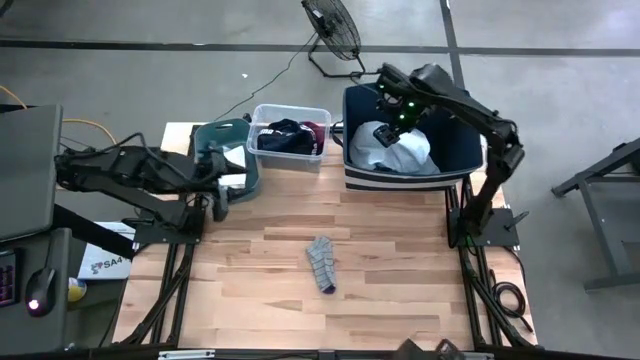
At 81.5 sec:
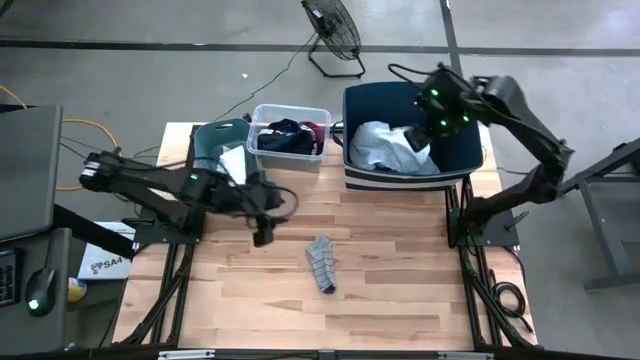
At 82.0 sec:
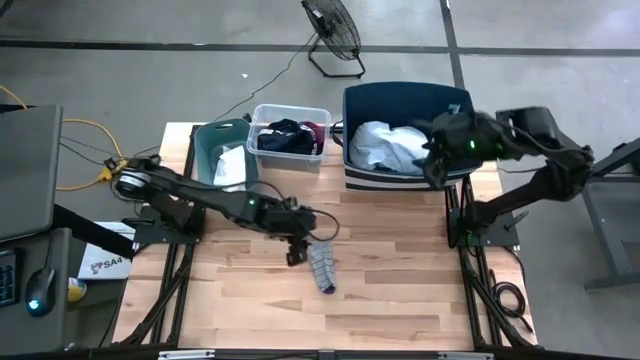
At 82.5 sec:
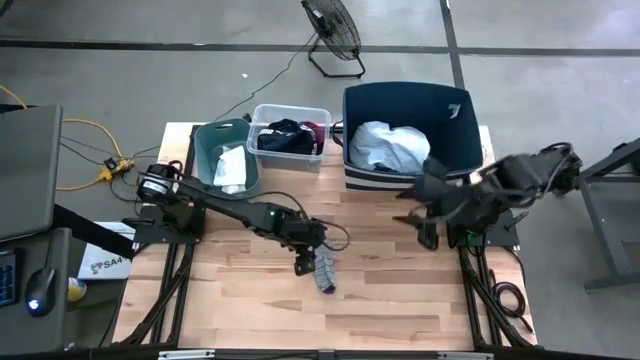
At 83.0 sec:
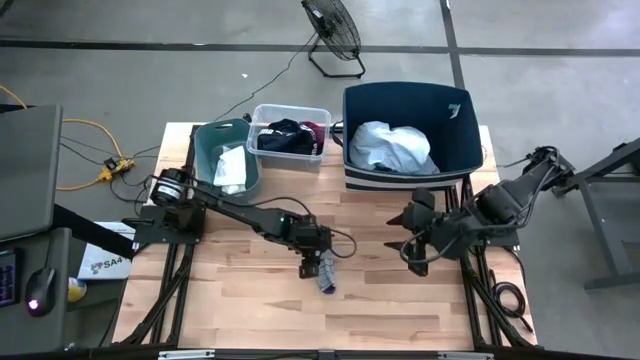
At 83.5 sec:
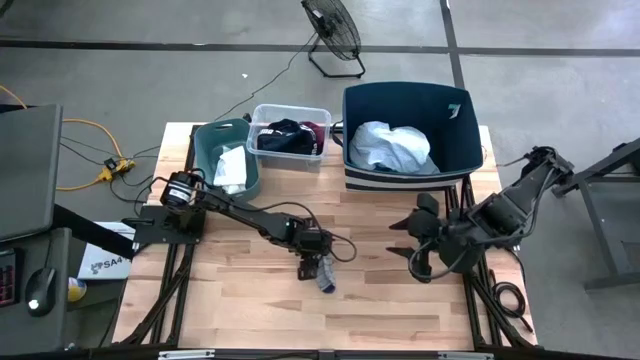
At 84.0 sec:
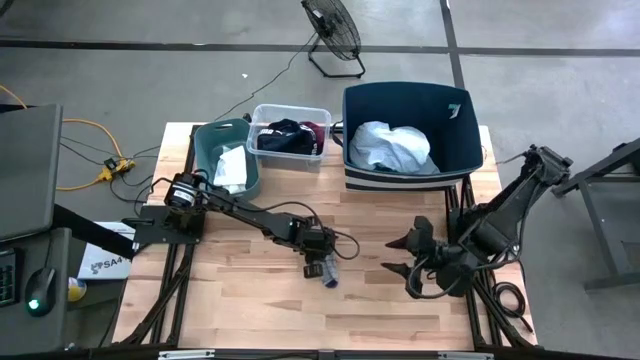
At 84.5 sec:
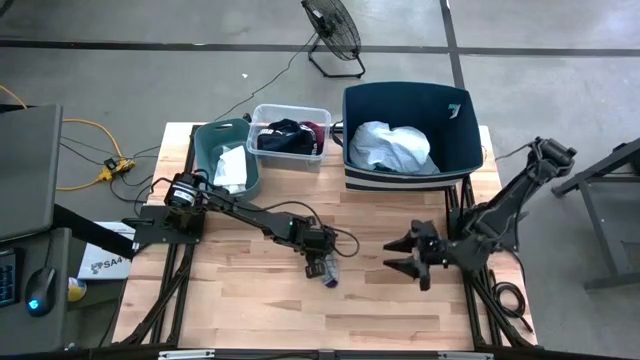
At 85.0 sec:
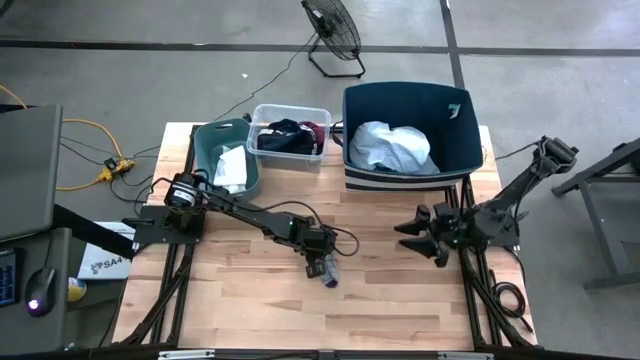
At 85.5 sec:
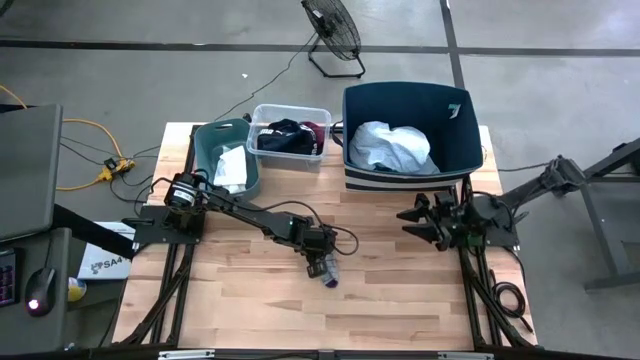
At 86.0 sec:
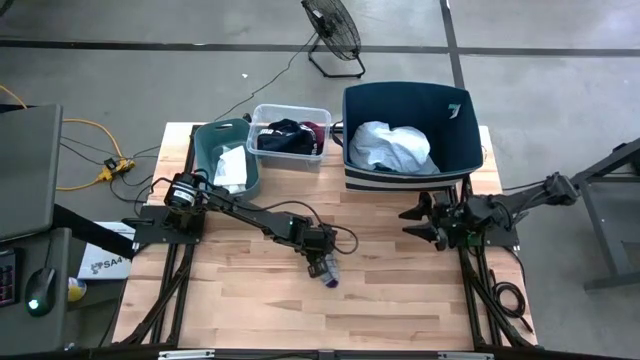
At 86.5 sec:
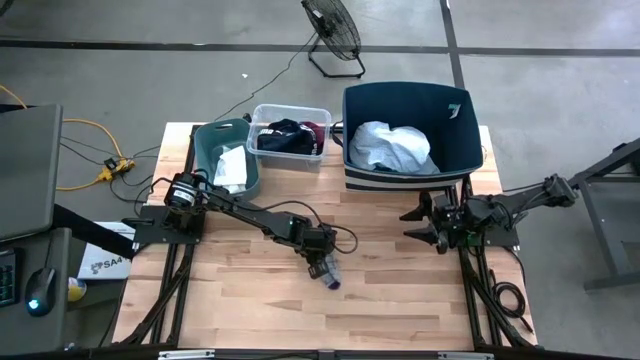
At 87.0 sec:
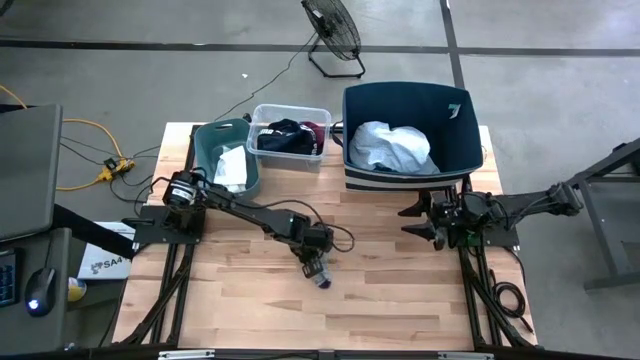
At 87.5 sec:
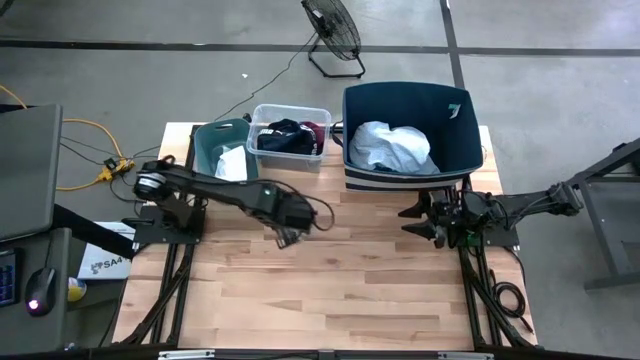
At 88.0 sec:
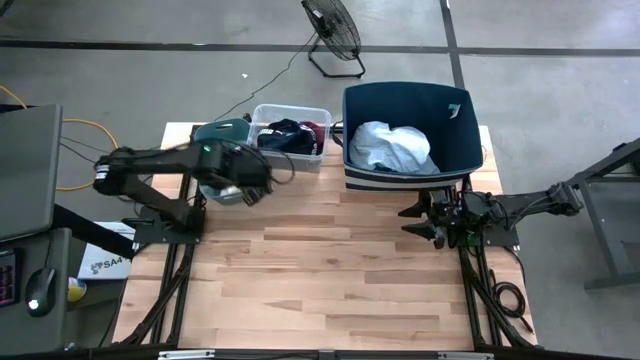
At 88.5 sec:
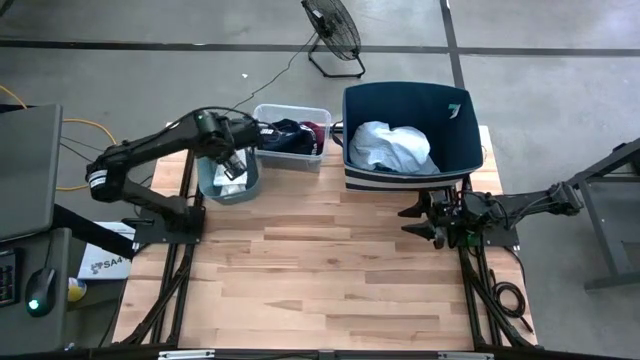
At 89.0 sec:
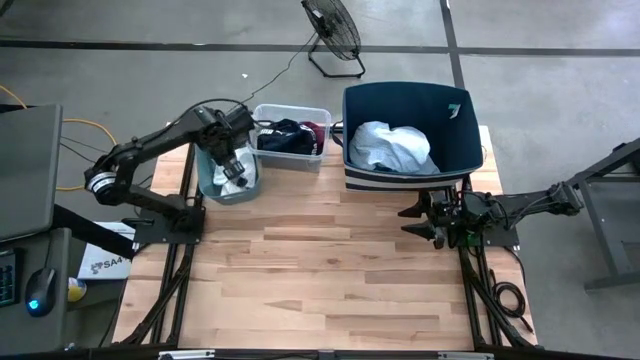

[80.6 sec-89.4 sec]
Task: Pick & Place Cloths
Put the gray sock into the blue bin

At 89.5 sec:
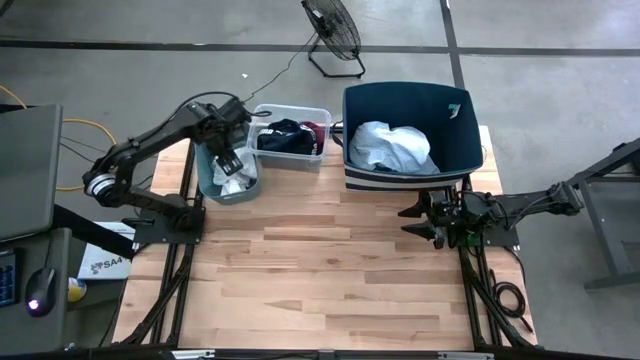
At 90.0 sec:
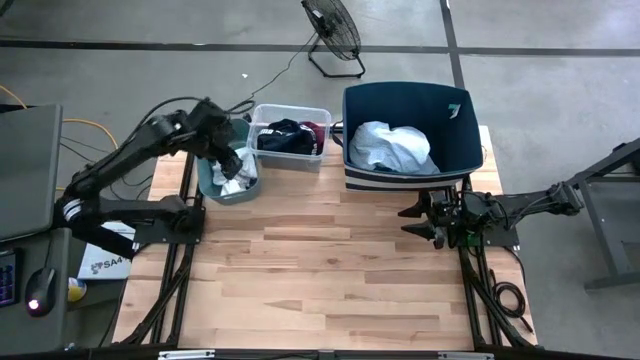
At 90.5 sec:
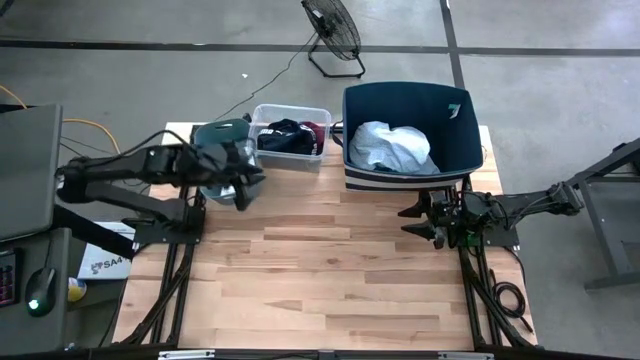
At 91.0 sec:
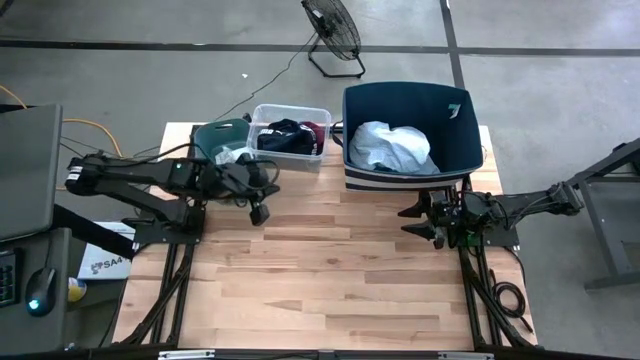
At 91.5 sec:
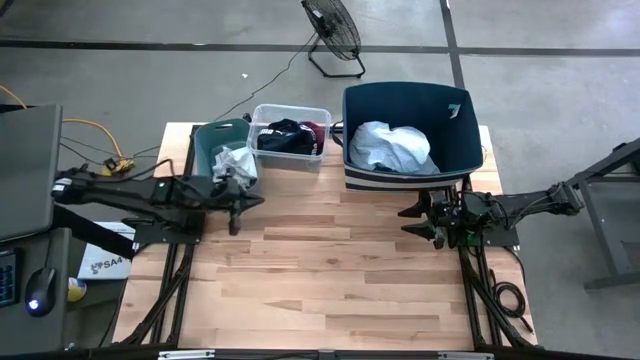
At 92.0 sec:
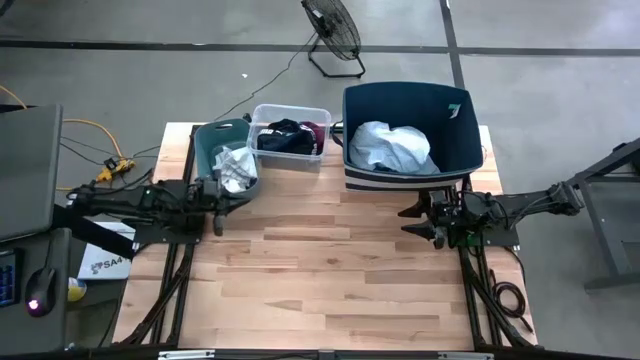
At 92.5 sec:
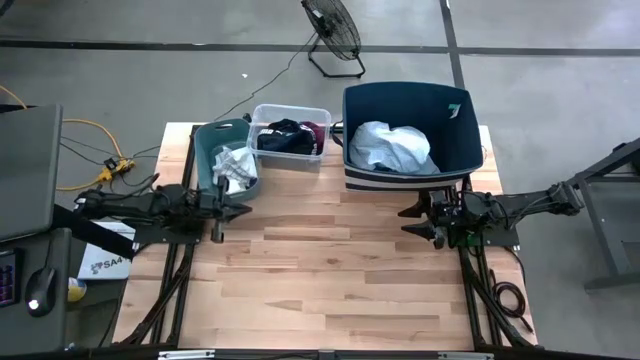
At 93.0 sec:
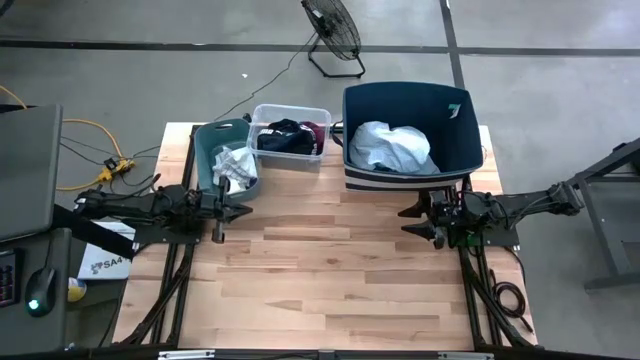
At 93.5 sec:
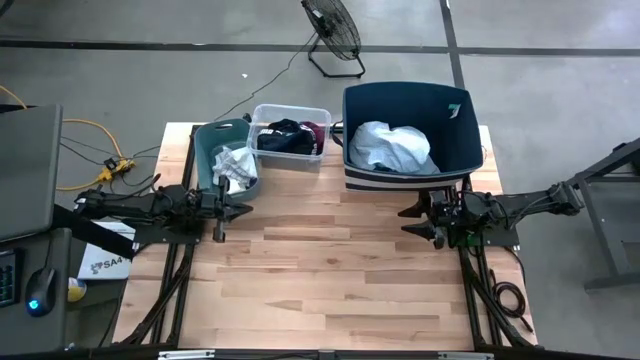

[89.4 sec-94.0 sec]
Return to Home Position

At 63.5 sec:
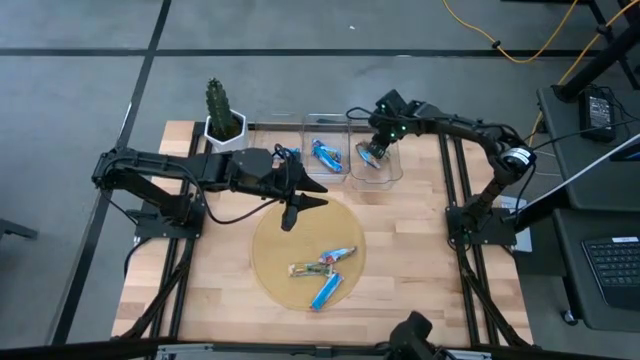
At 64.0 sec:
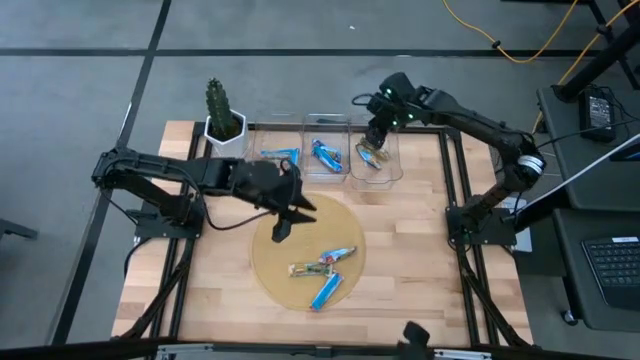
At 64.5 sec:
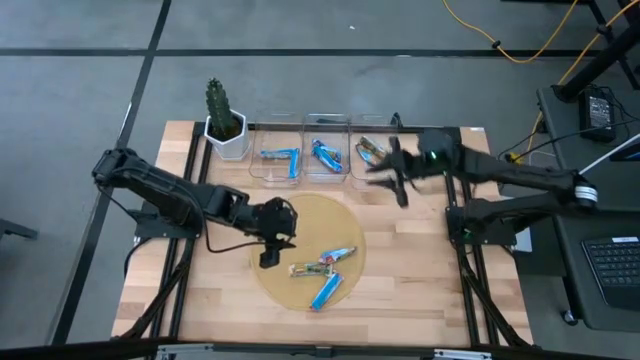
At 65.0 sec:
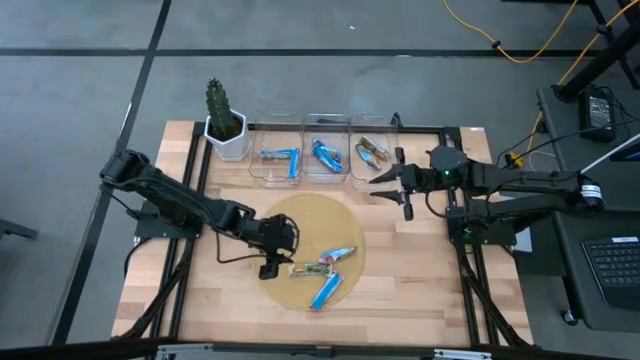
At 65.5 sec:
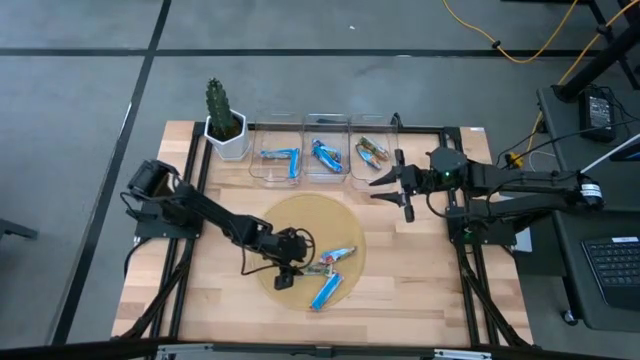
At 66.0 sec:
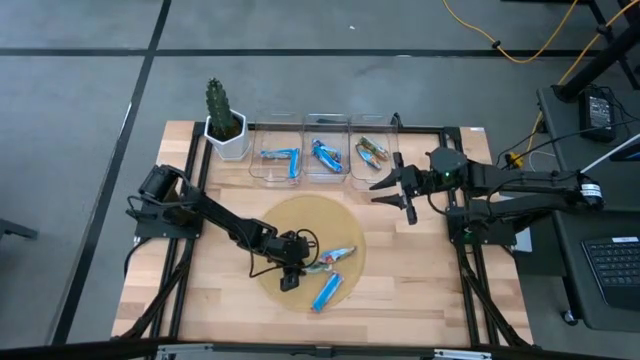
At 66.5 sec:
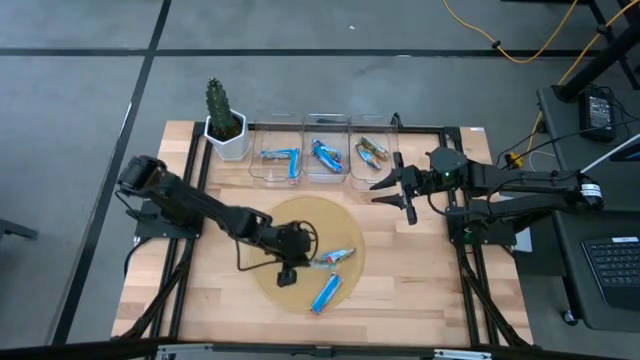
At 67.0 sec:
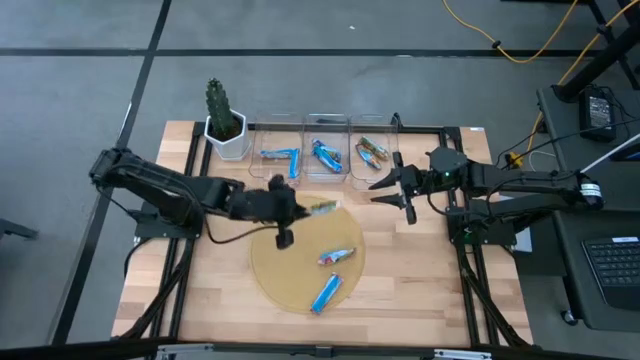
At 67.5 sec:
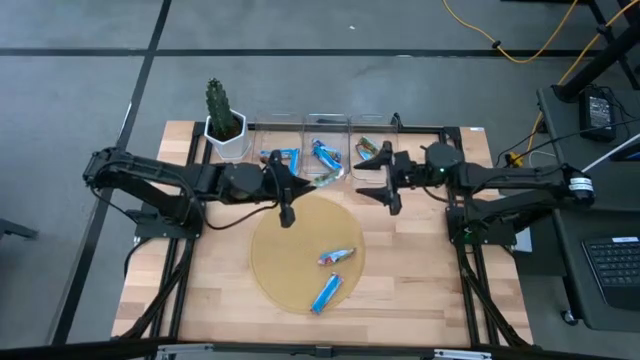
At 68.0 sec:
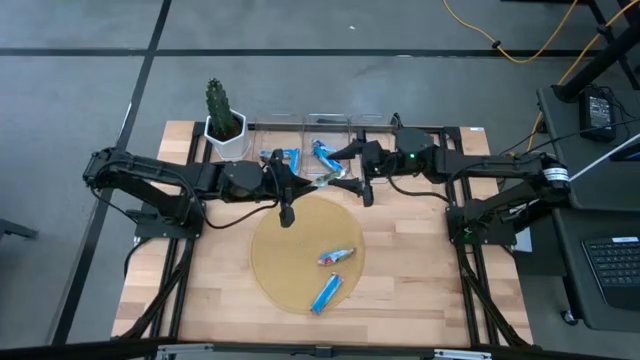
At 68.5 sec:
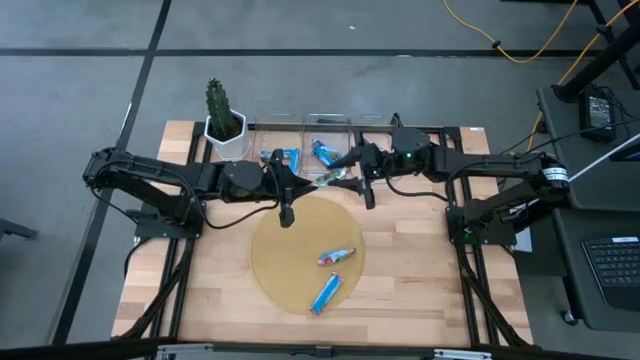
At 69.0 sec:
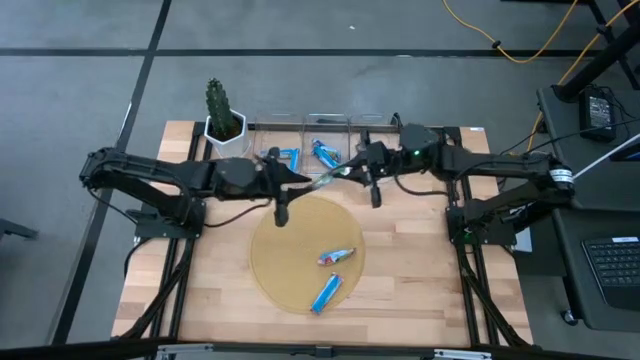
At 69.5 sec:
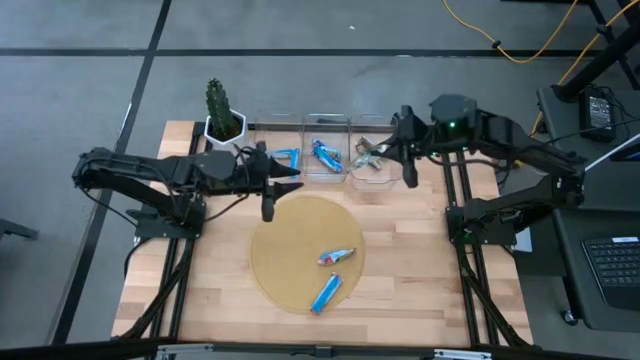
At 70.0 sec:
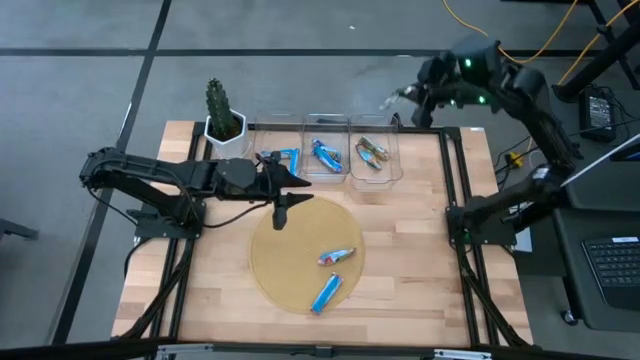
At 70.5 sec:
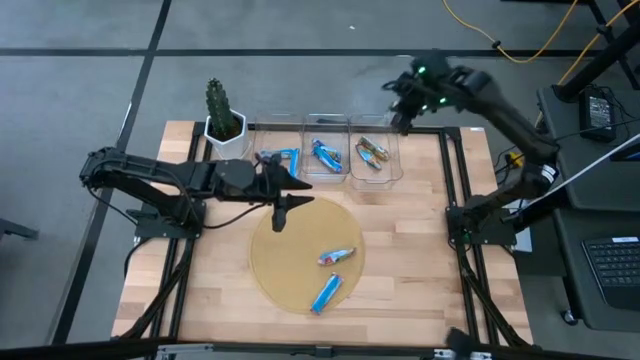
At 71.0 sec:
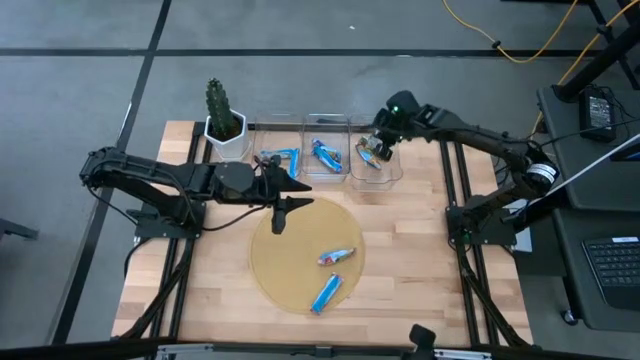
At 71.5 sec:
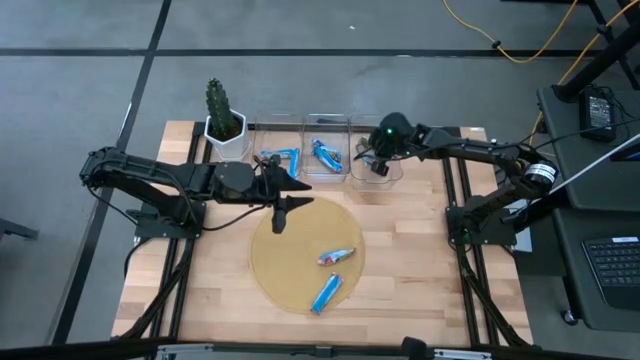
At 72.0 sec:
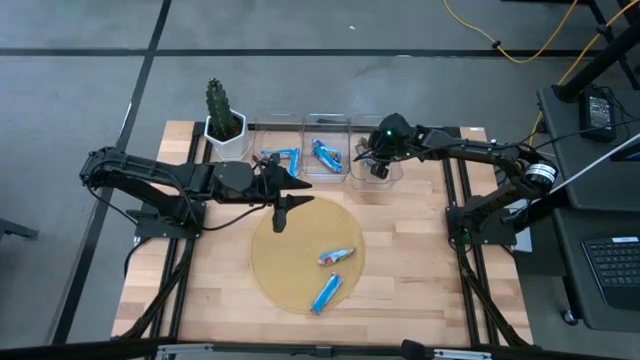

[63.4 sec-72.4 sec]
Task: Pick and place Granola Bars by type
Put the orange granola bar into the right transparent bin
